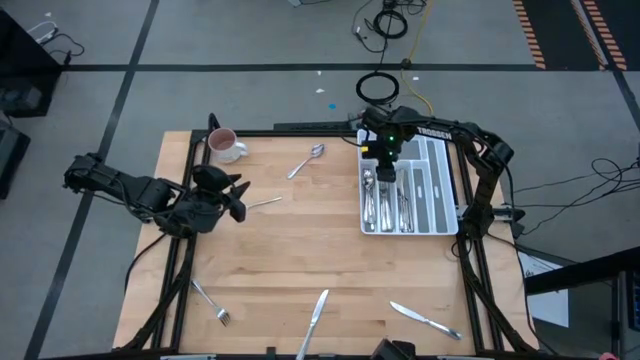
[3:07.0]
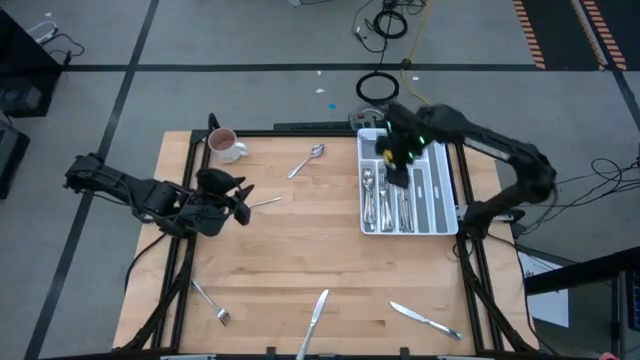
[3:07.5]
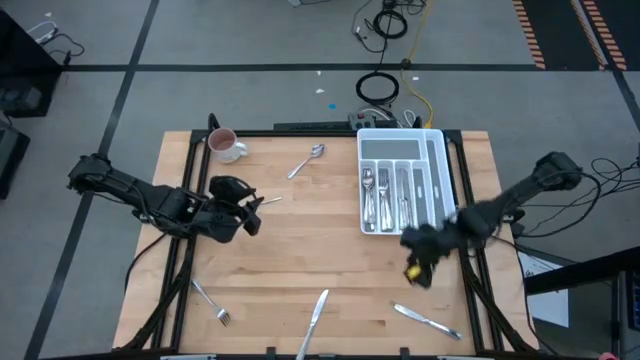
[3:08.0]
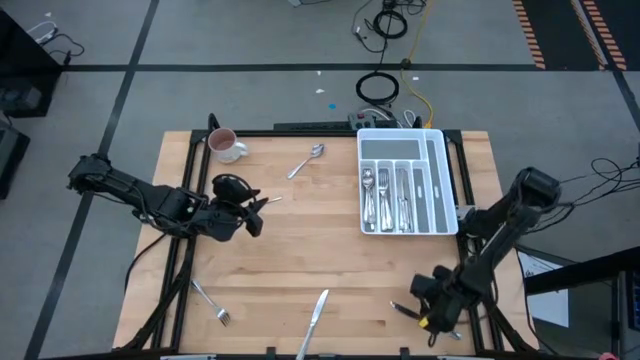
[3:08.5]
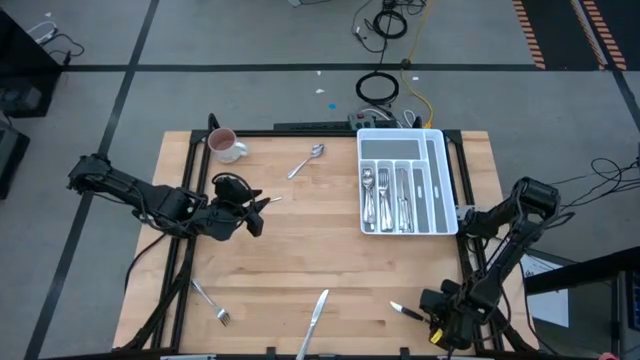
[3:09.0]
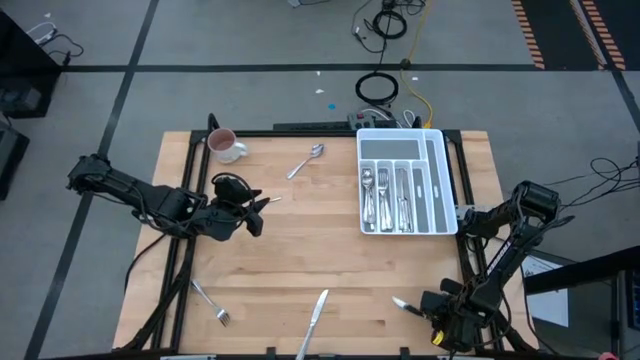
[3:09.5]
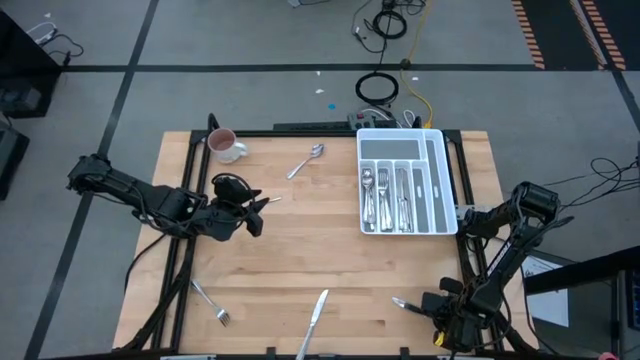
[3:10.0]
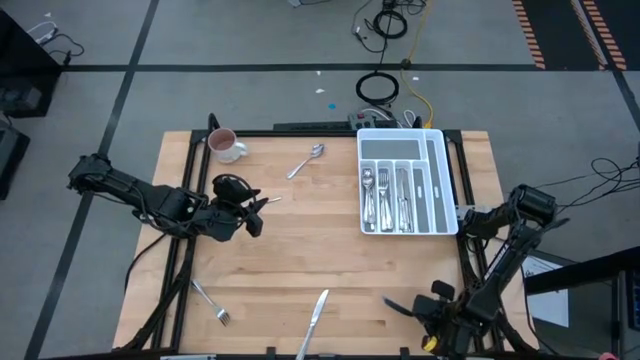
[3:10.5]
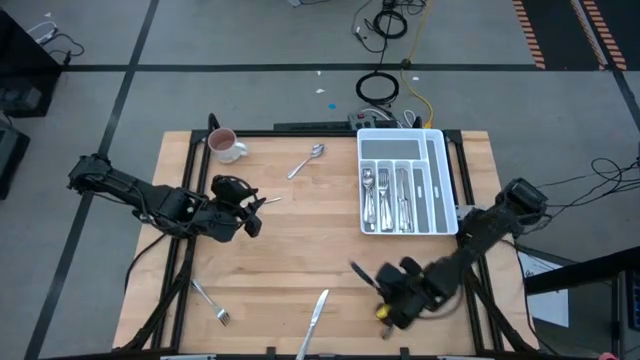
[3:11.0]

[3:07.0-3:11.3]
Task: Sort silverware
Put the silver table knife into the silverware tray

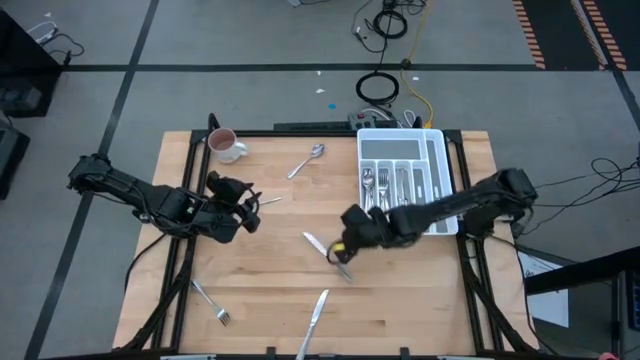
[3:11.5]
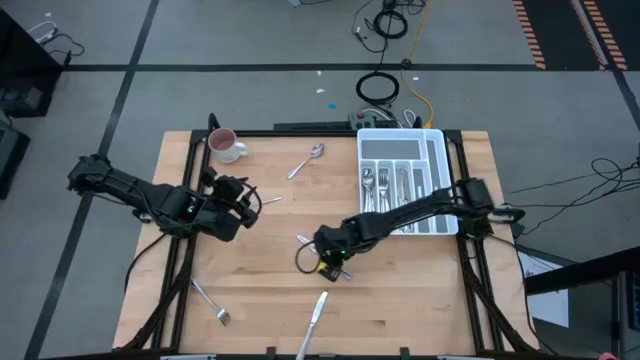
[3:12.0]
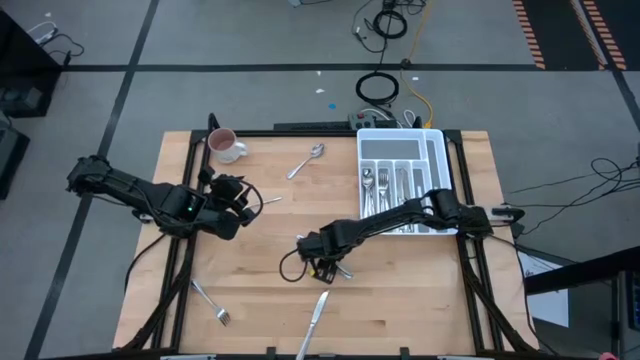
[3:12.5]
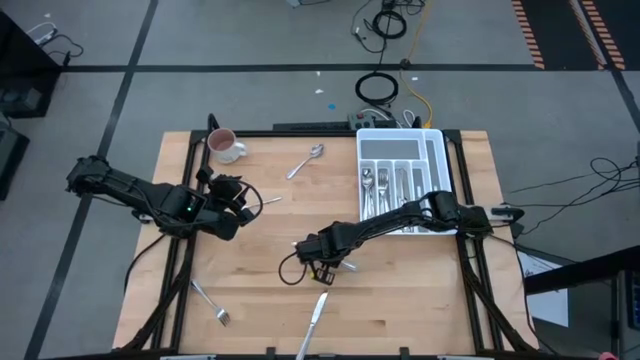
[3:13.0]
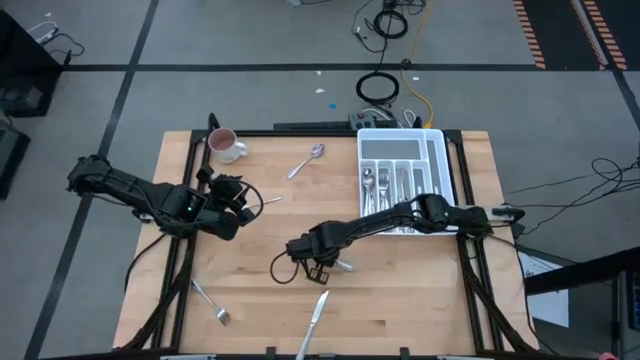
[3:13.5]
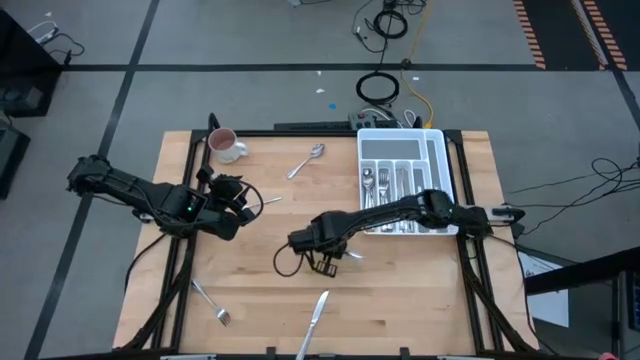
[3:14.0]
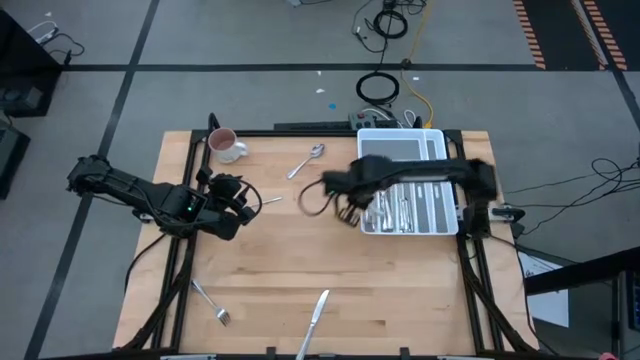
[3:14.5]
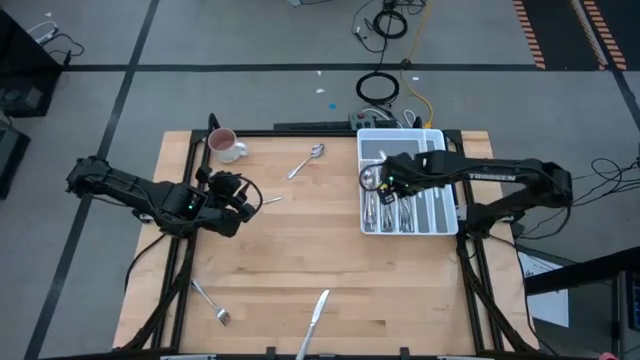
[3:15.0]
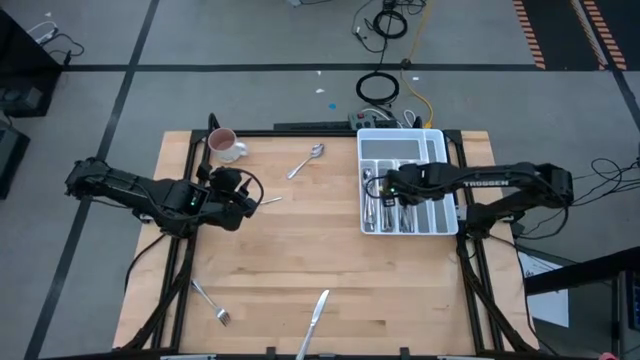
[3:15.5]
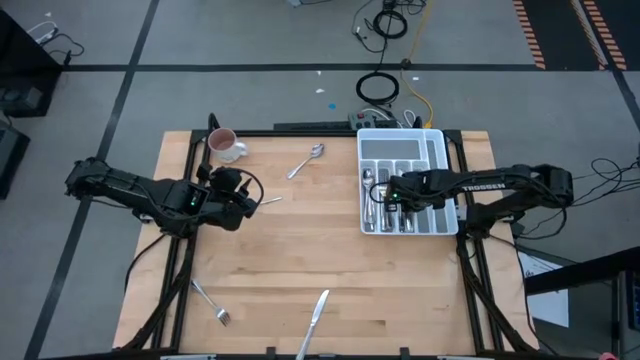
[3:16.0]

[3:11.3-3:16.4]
Put the silver table knife into the silverware tray

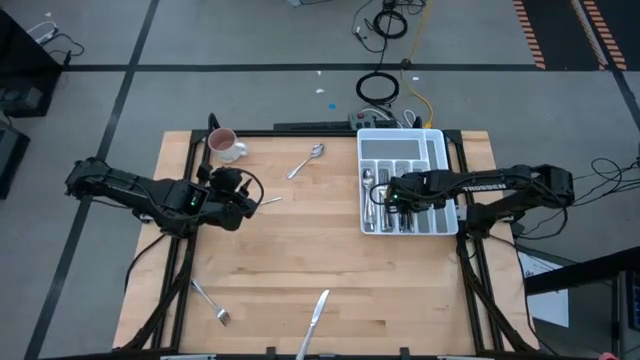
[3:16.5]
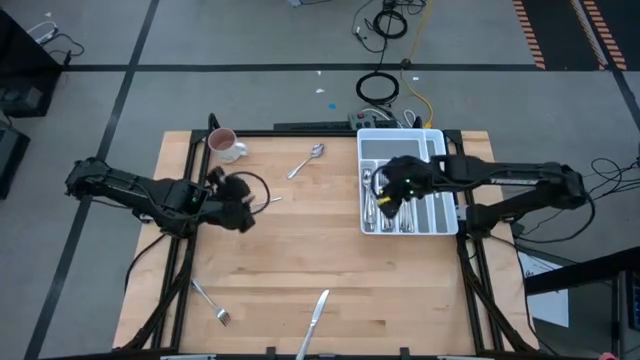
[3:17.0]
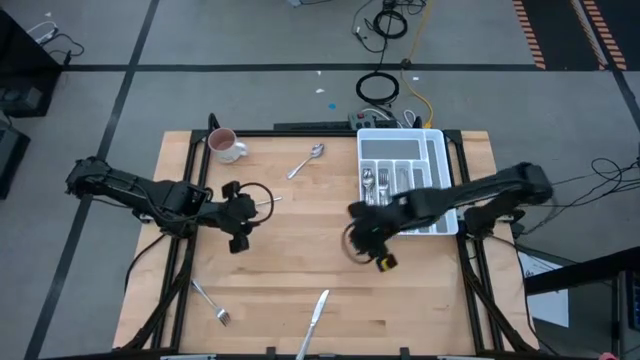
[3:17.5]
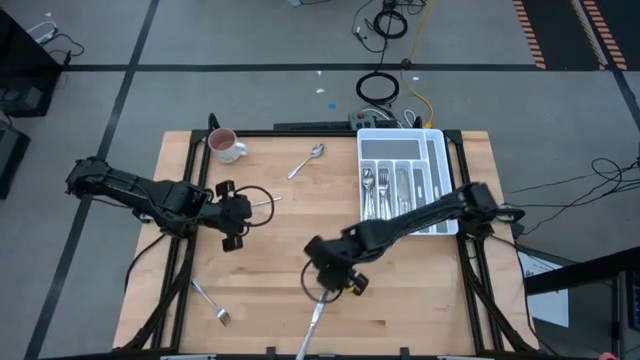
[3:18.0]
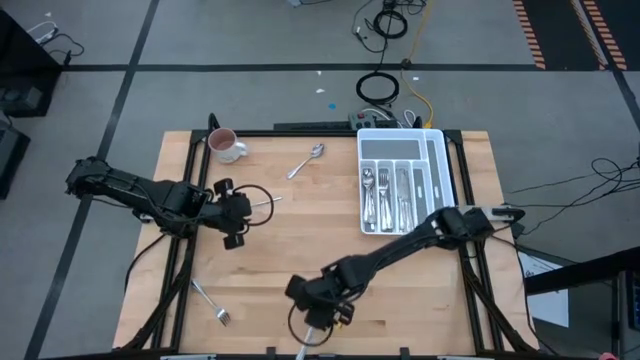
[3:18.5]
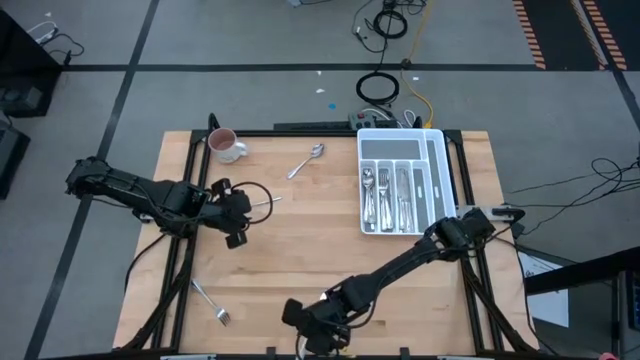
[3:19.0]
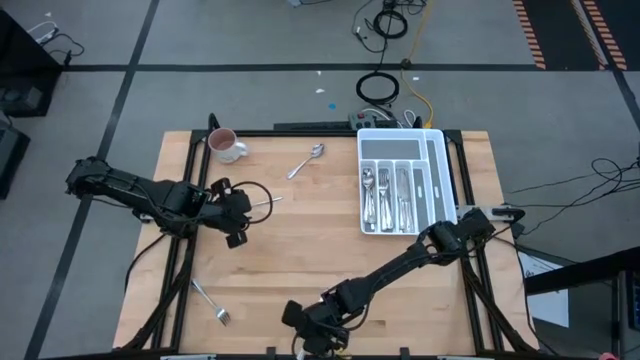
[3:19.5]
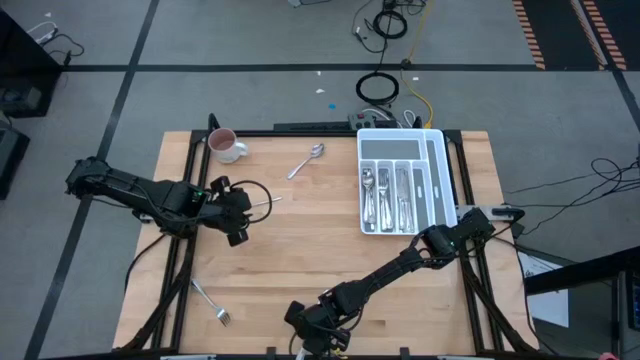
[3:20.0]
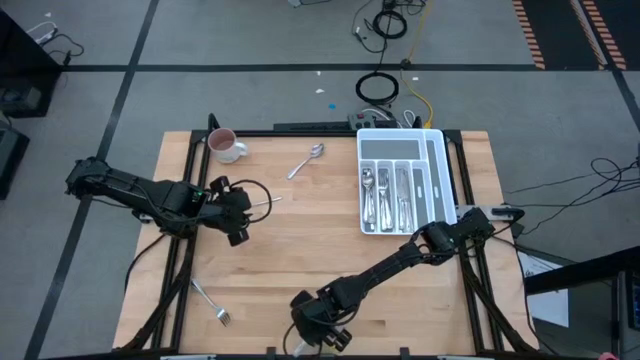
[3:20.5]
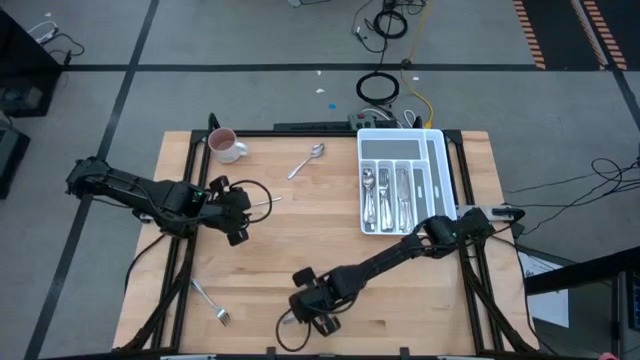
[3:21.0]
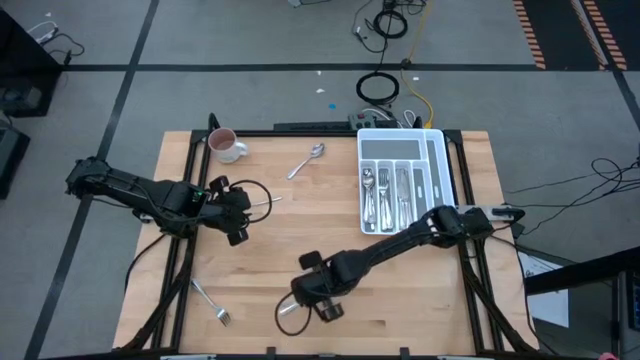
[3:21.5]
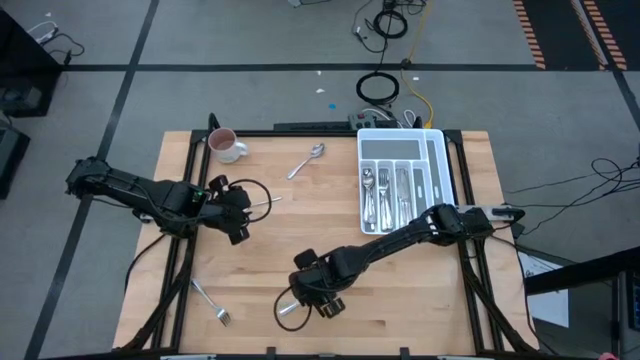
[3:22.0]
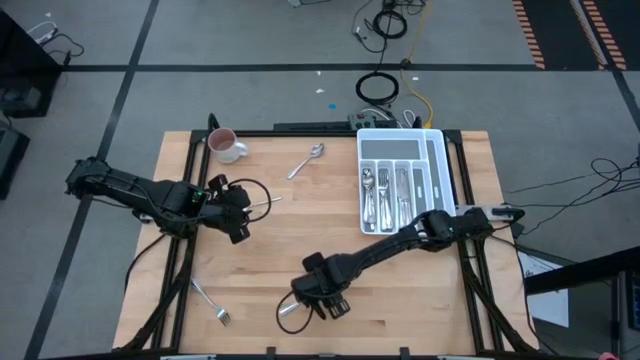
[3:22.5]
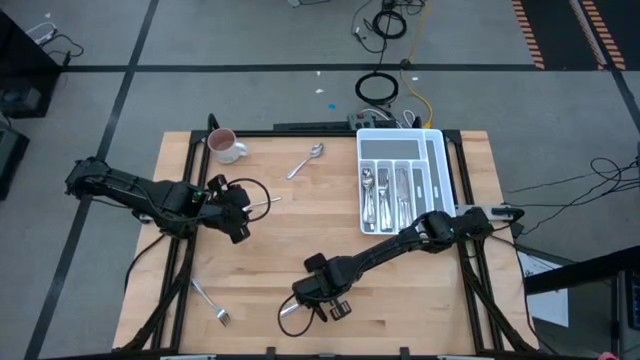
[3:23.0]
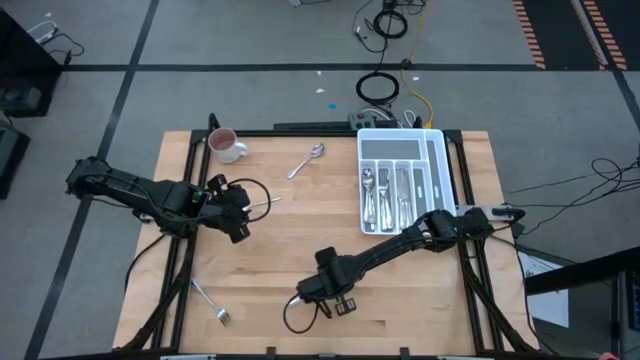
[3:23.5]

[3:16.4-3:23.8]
Put the silver table knife into the silverware tray

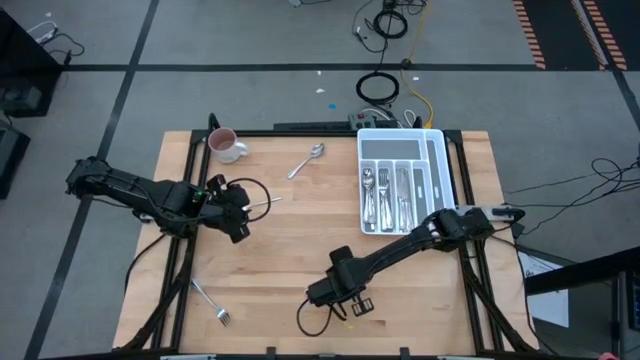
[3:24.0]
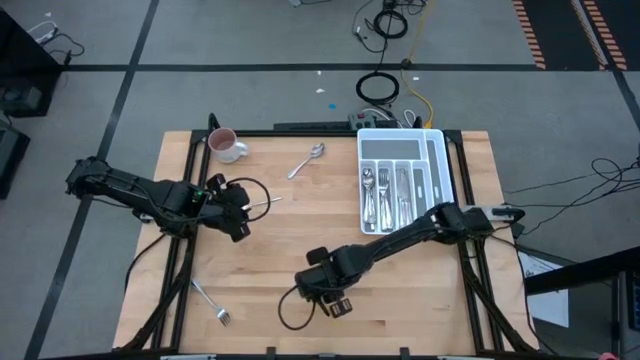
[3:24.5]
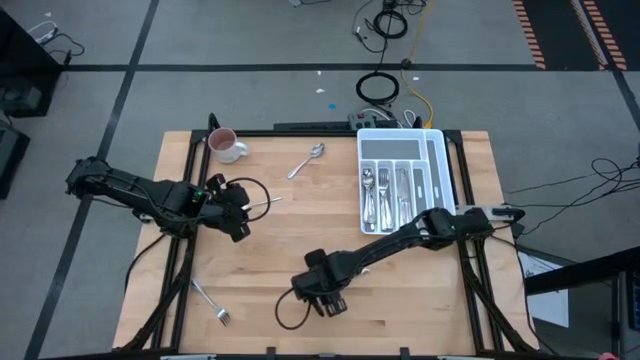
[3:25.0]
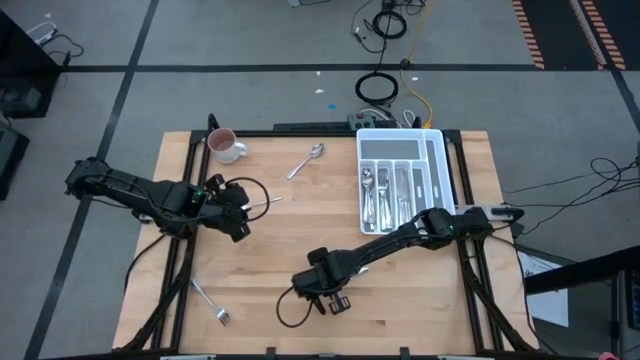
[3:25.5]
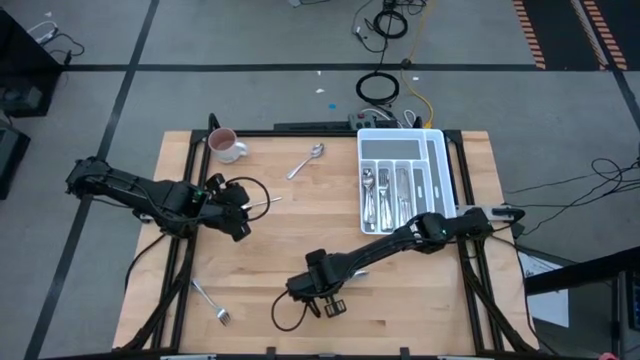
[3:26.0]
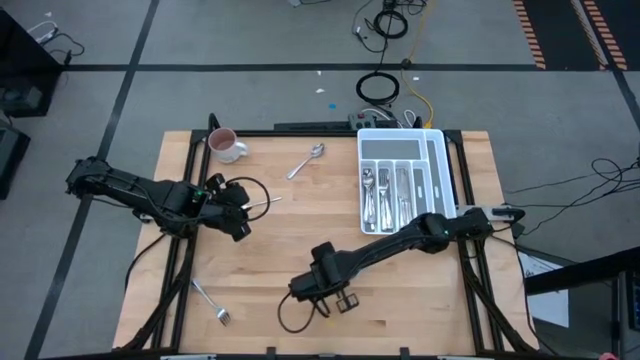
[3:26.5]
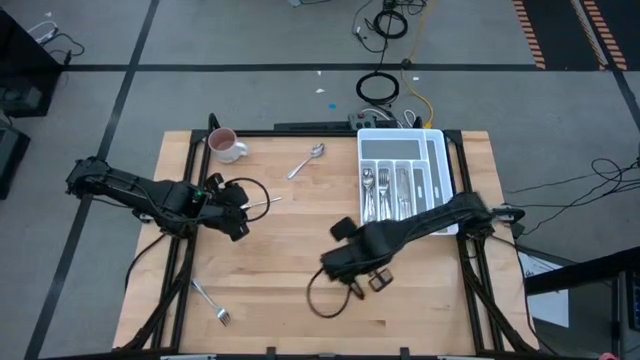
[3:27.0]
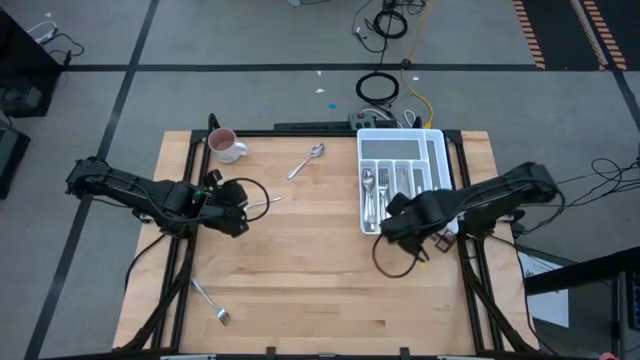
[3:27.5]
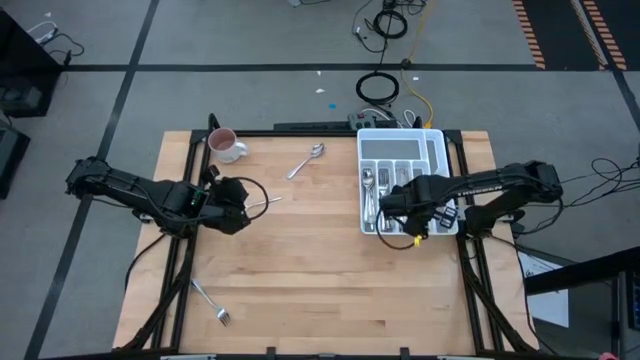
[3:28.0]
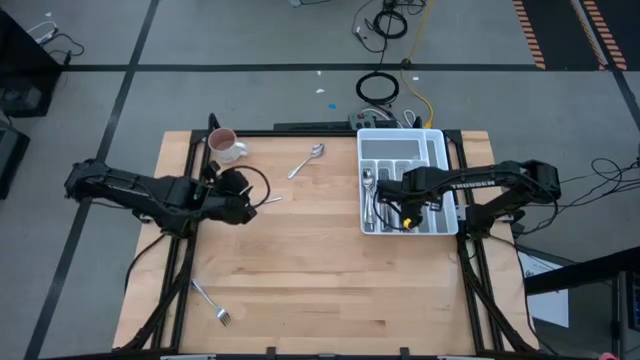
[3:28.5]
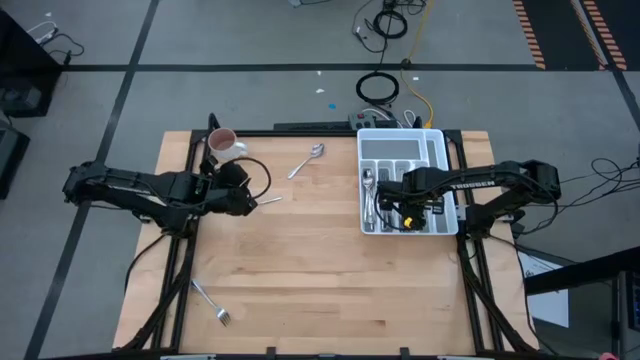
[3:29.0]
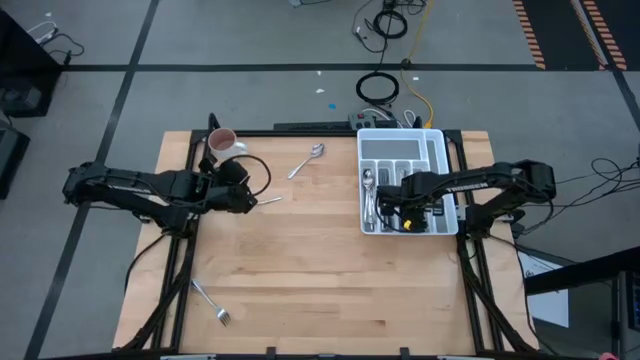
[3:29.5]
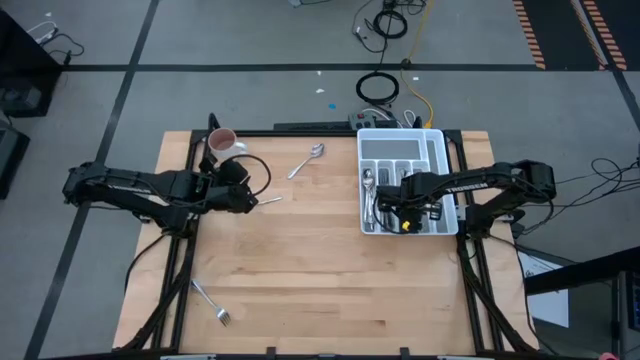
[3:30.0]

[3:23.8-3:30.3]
Put the silver table knife into the silverware tray
